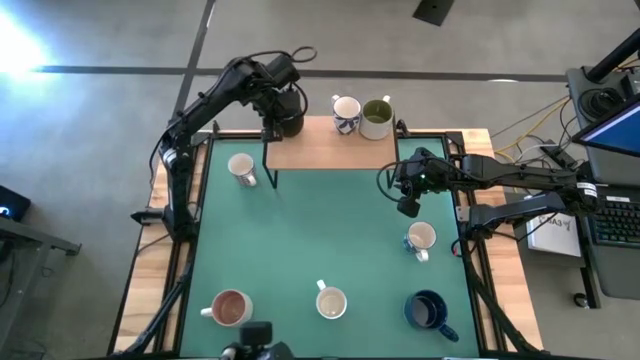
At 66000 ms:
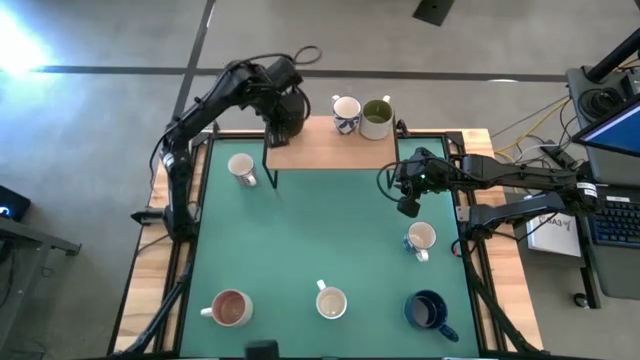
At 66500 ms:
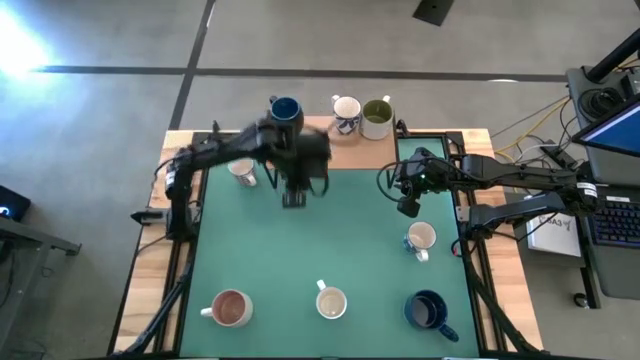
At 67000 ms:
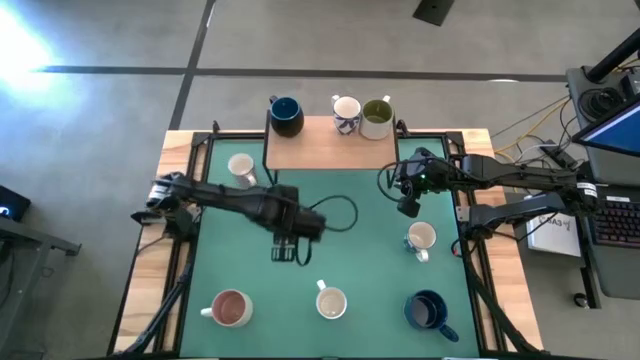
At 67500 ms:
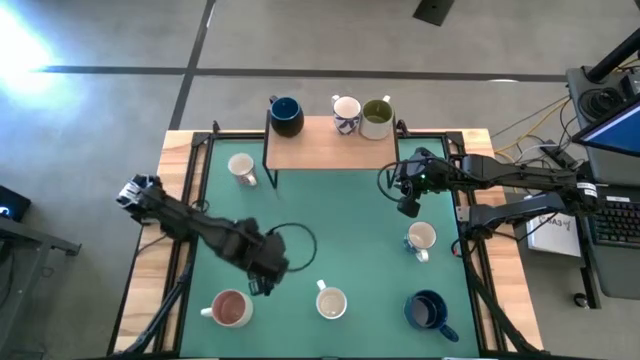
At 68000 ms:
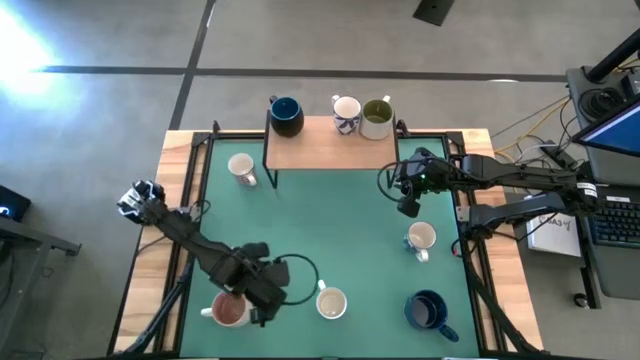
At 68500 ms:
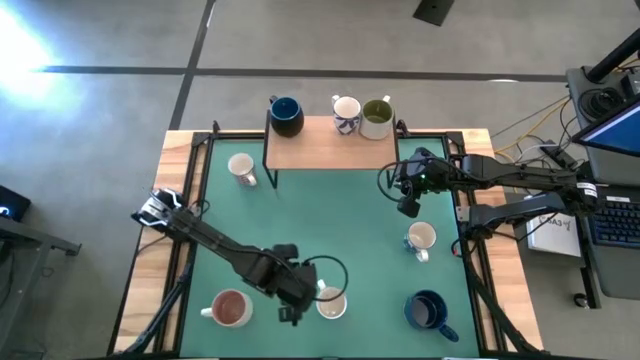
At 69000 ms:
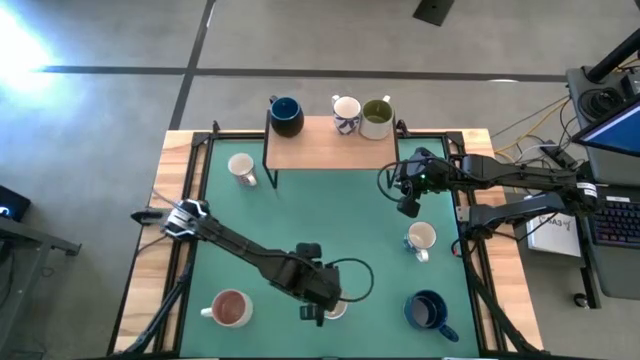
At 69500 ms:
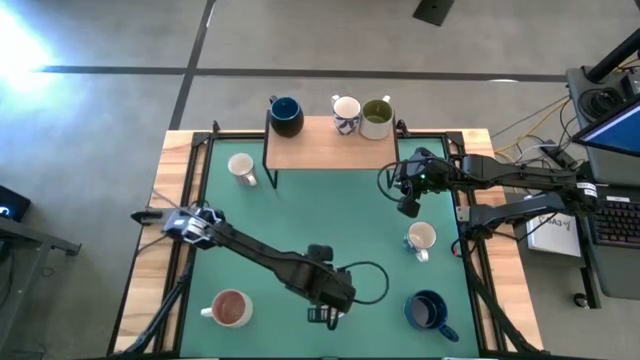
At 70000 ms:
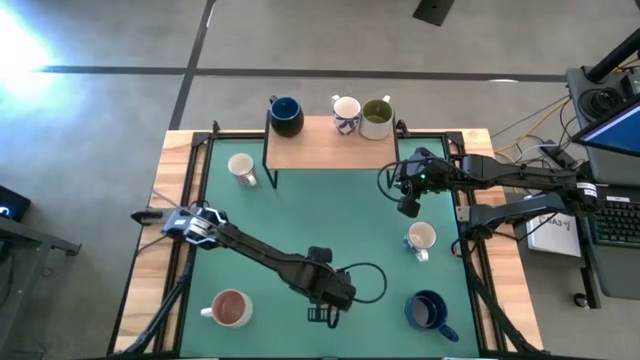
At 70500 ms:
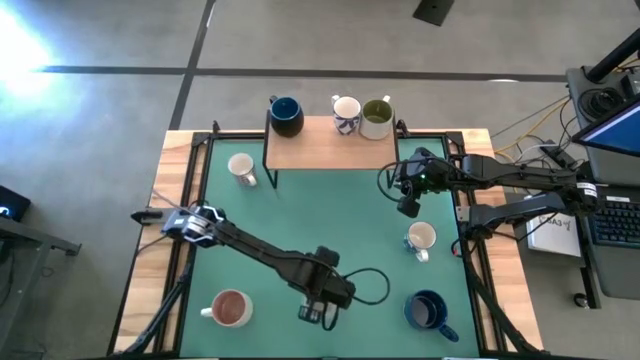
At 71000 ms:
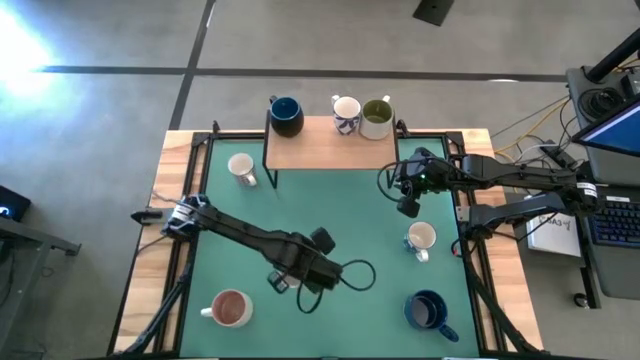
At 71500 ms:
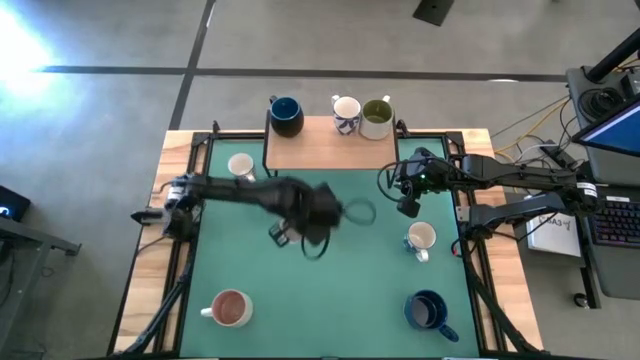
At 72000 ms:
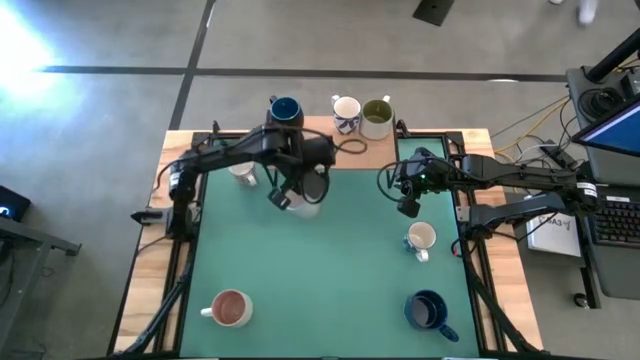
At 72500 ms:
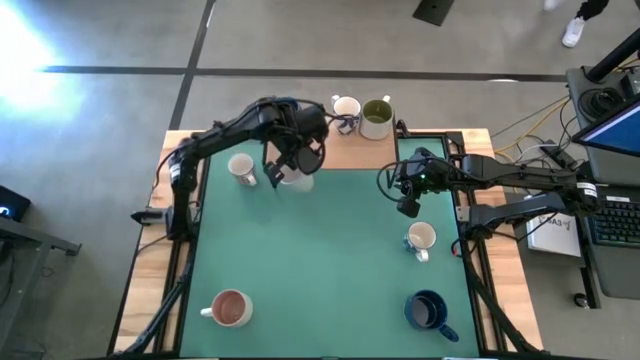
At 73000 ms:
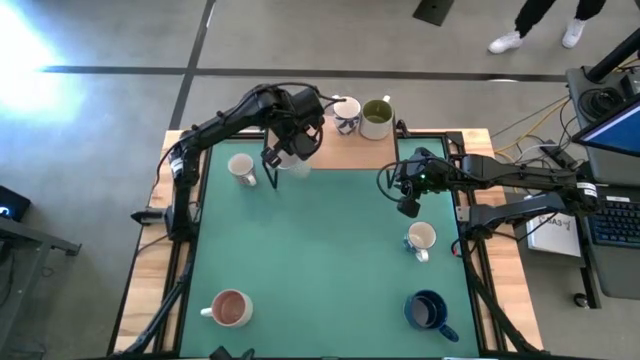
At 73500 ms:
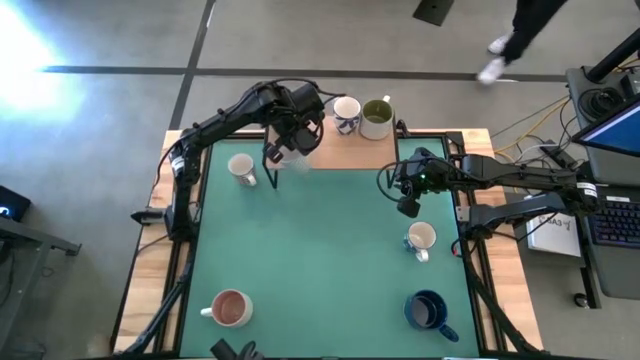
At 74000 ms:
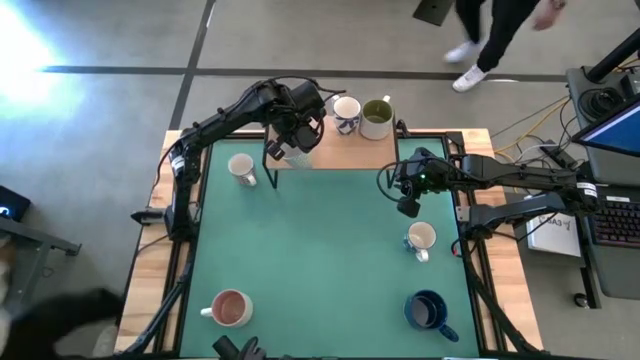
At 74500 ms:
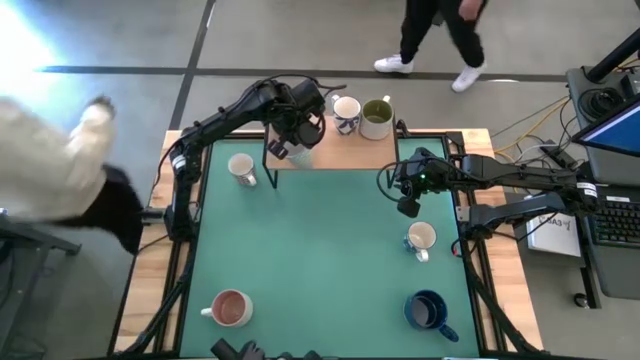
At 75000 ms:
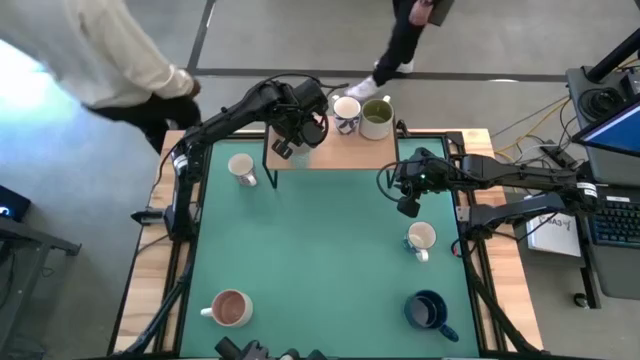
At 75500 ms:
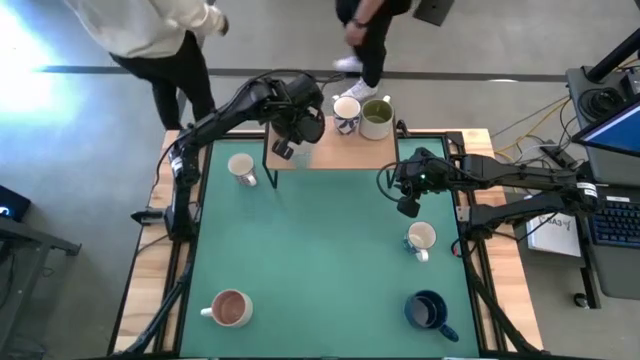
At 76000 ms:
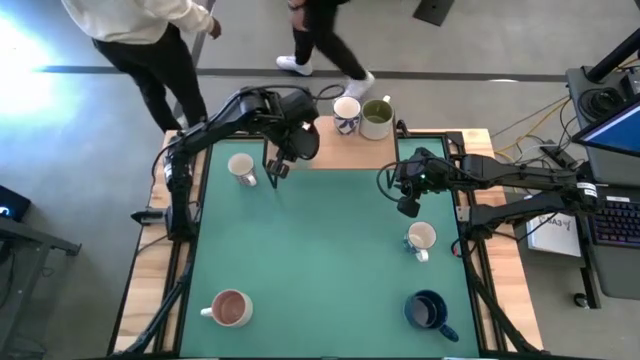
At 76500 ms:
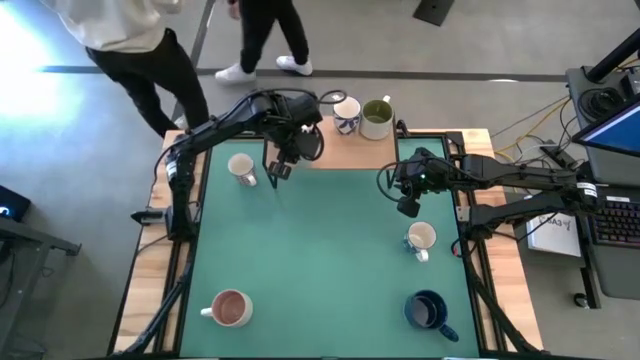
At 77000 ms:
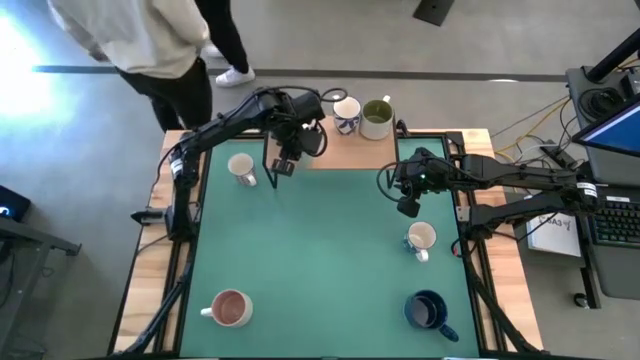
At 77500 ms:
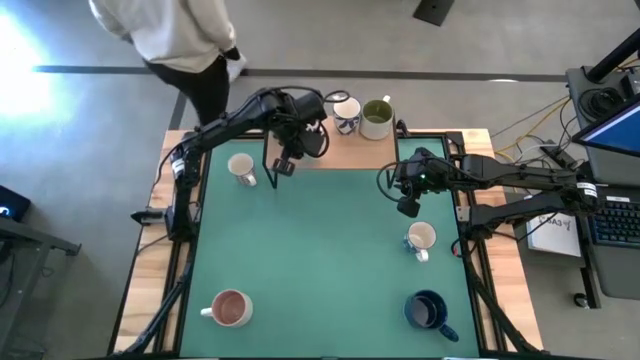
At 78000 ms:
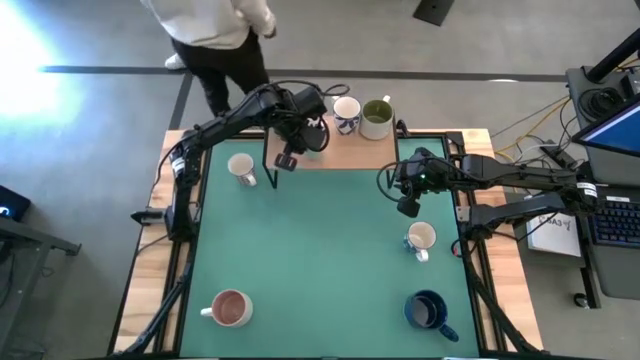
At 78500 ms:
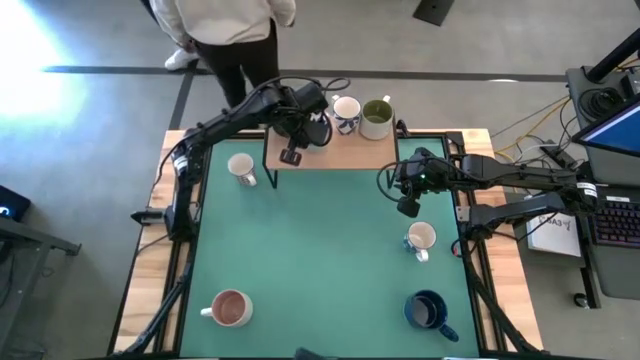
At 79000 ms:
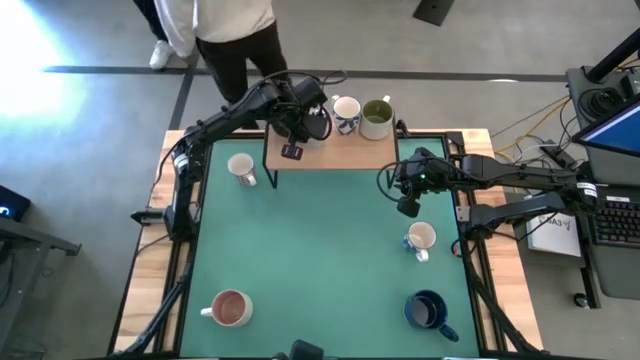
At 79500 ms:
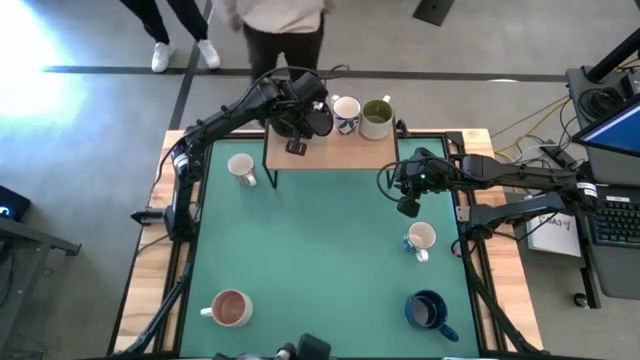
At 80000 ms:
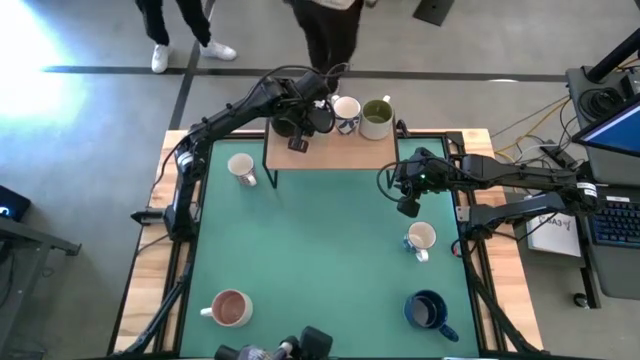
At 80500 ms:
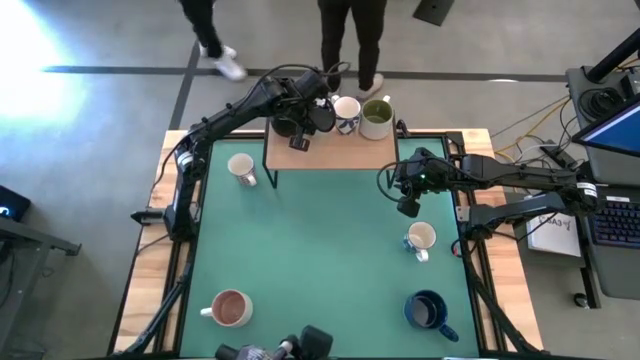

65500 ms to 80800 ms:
Task: Place coffee mugs
Put the green mug on the shelf
